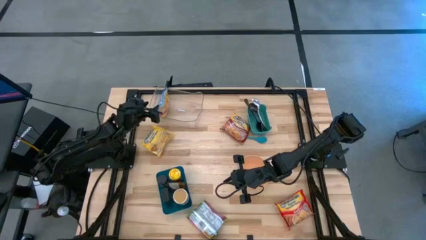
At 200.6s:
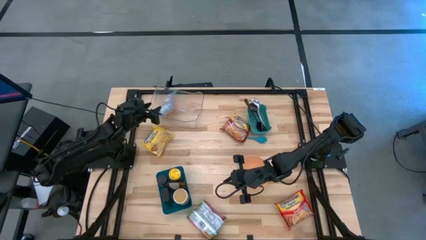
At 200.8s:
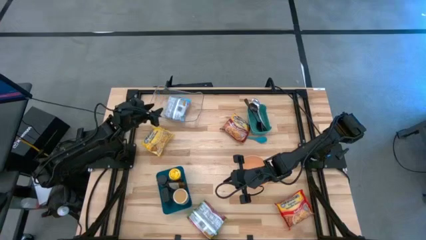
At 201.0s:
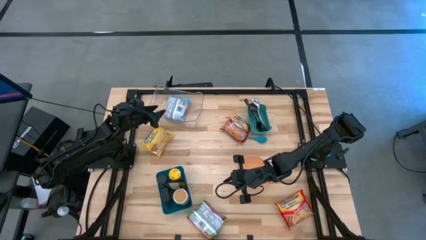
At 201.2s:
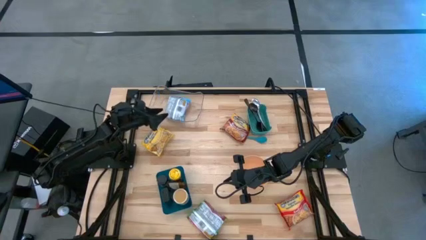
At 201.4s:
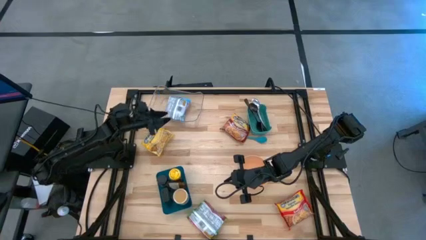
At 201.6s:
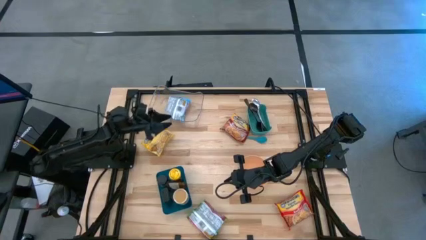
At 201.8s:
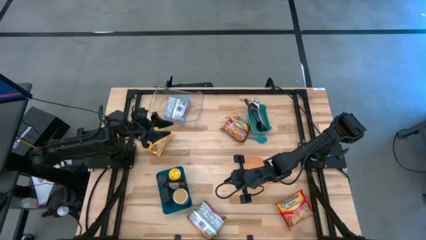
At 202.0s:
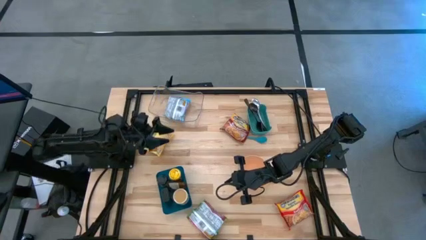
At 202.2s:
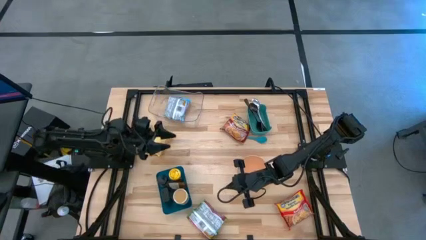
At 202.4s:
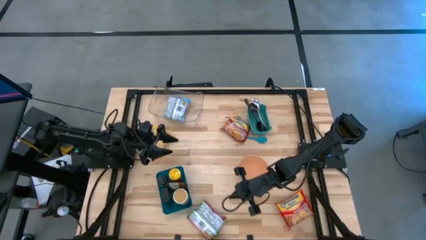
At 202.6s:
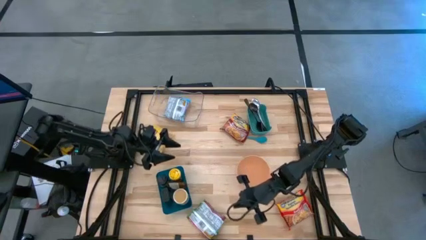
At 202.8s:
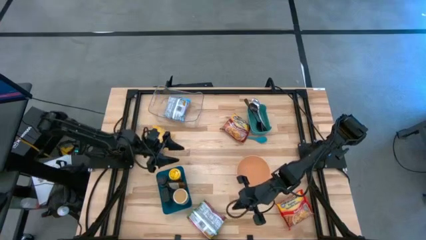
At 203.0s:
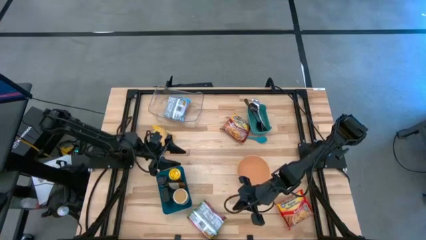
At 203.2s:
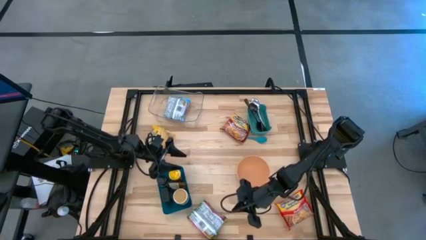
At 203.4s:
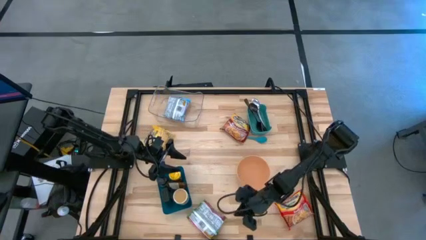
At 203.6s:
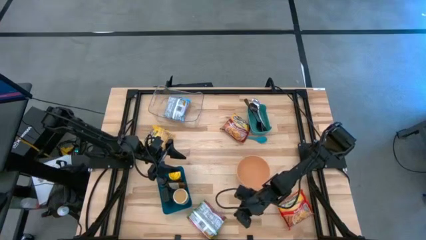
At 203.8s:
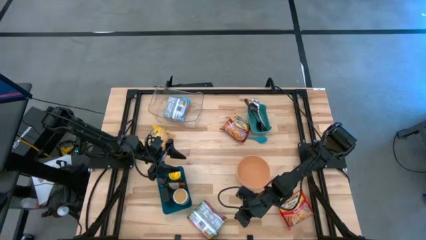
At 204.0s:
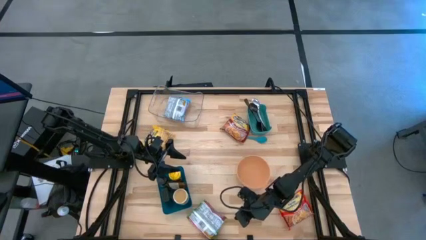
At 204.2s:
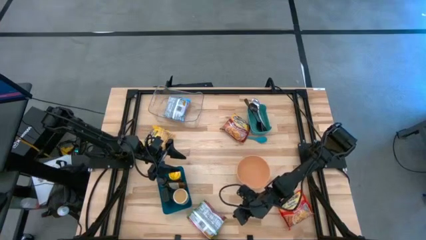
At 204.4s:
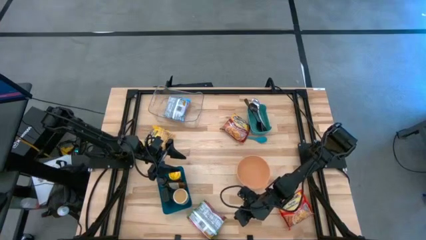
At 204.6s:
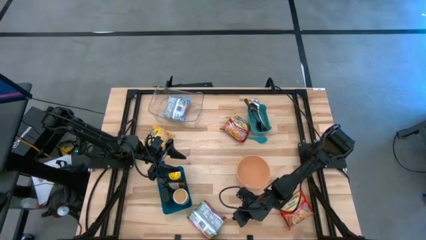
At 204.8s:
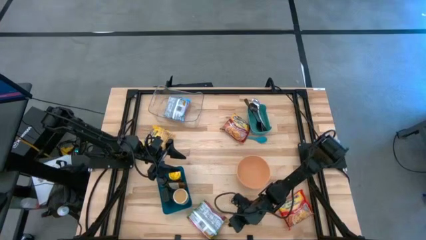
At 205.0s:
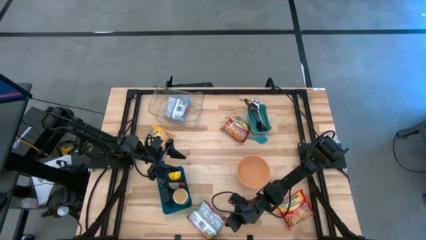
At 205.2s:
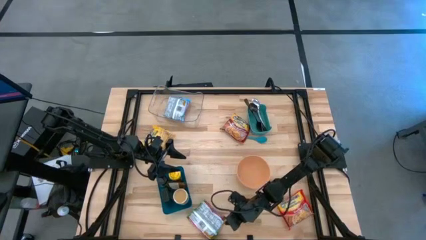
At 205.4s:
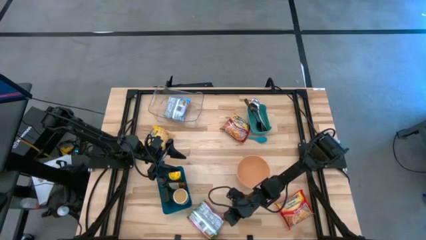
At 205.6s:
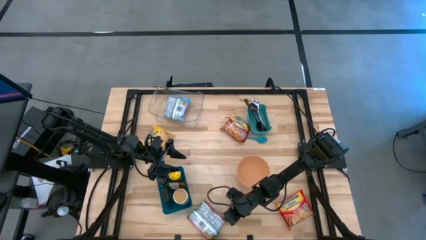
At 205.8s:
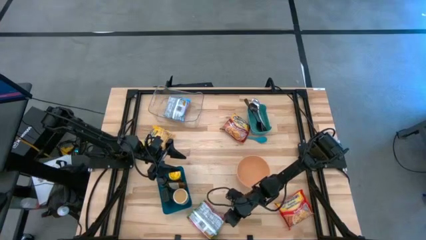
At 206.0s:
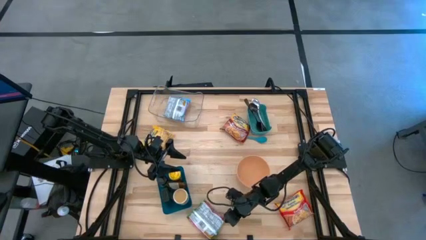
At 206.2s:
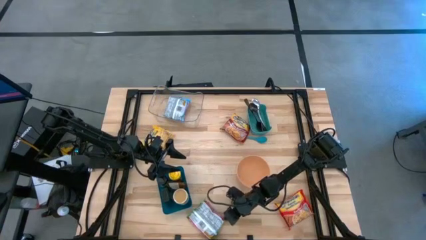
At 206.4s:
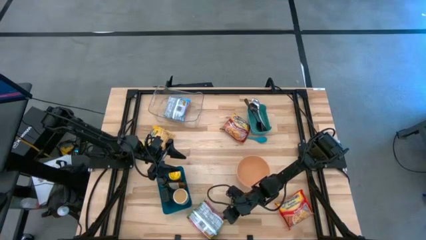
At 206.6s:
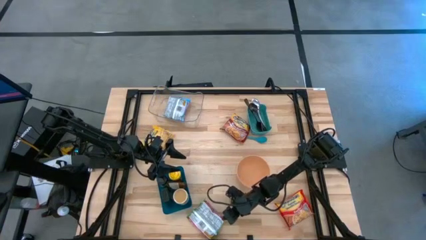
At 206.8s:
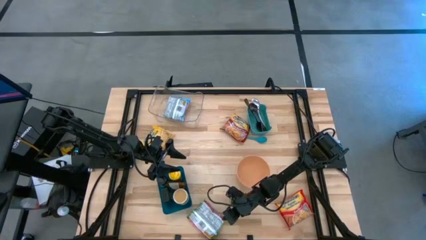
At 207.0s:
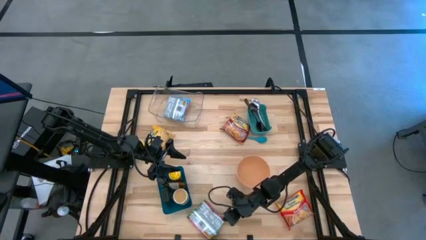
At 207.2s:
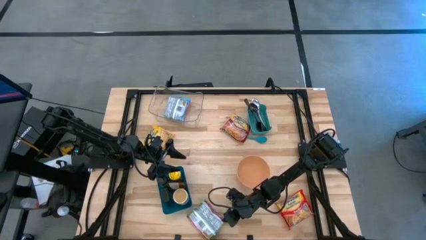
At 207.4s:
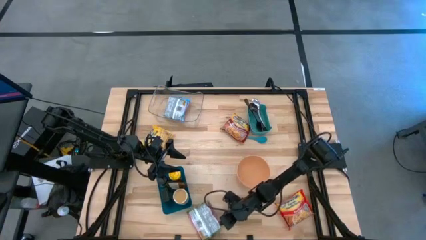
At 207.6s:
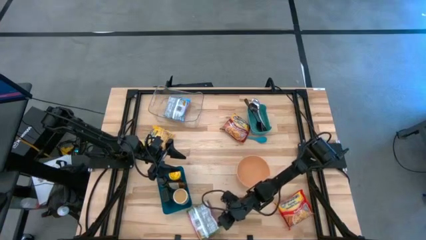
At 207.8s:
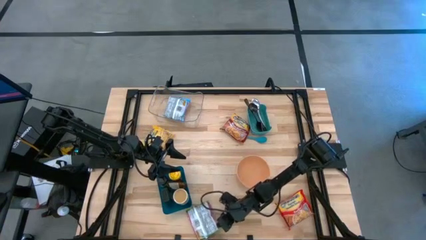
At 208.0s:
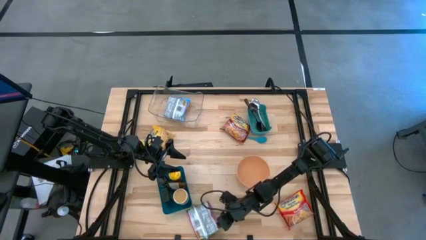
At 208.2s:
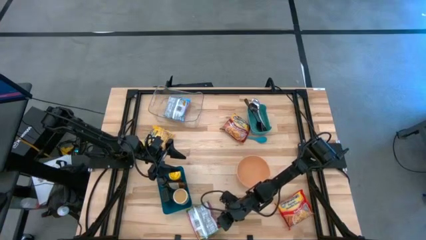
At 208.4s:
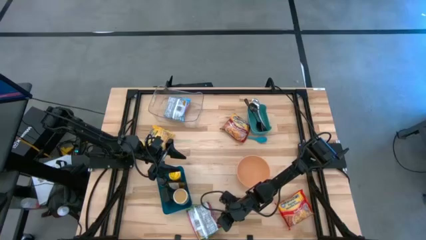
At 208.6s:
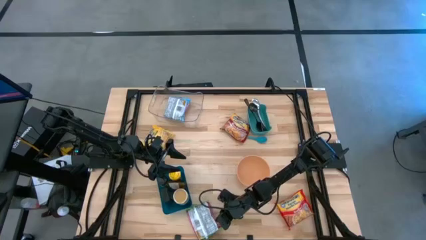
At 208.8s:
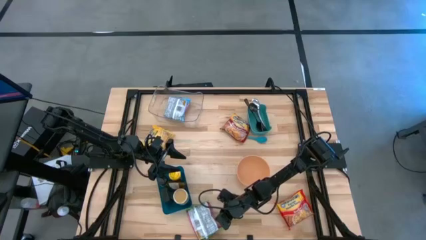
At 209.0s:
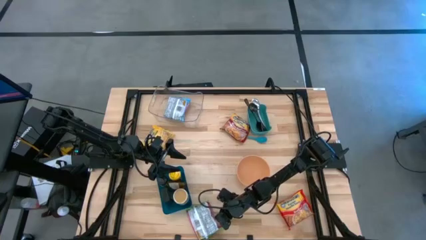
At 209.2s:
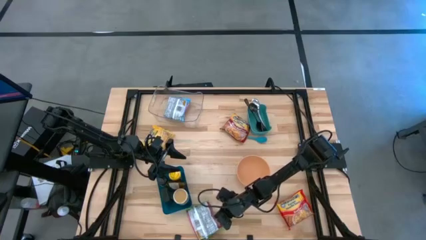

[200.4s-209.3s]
Task: Pick & Place Food Item
Put the green noodle pack into the transparent bin

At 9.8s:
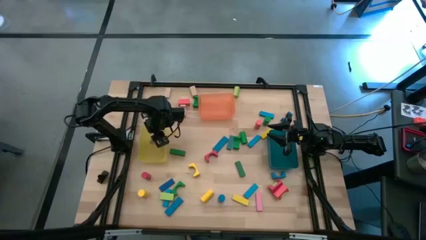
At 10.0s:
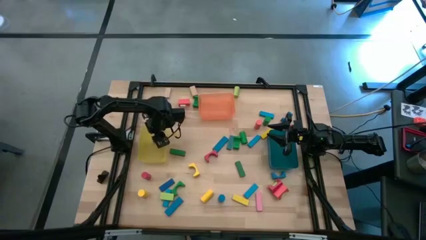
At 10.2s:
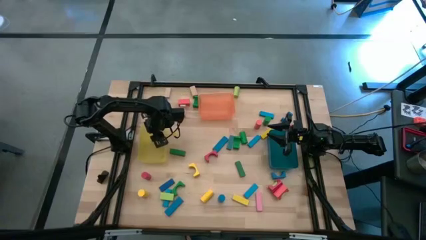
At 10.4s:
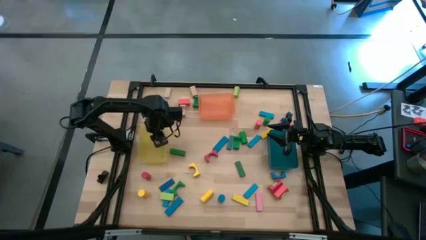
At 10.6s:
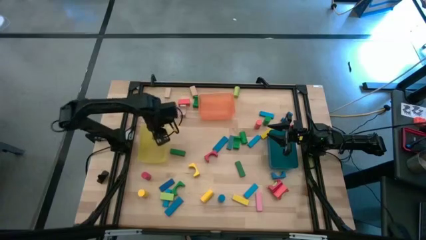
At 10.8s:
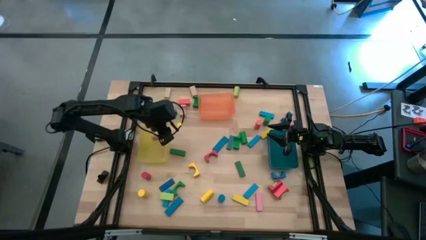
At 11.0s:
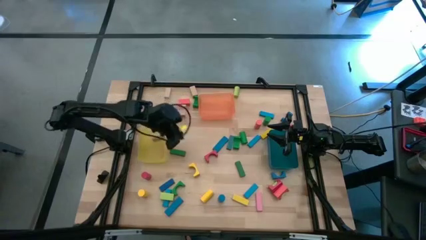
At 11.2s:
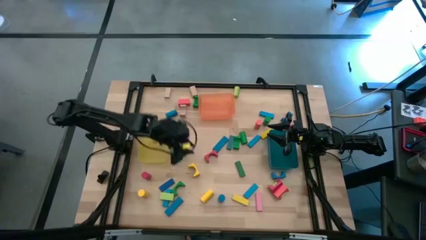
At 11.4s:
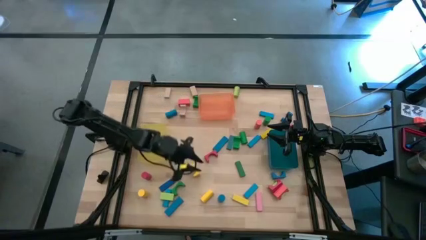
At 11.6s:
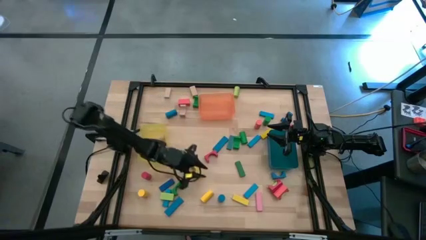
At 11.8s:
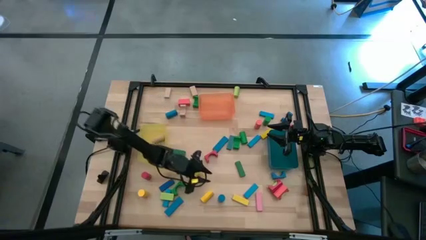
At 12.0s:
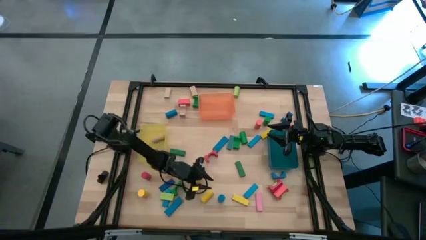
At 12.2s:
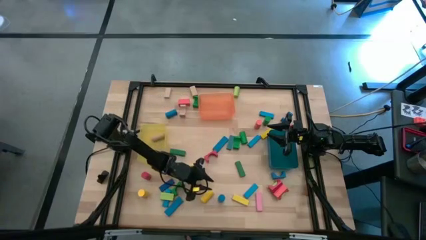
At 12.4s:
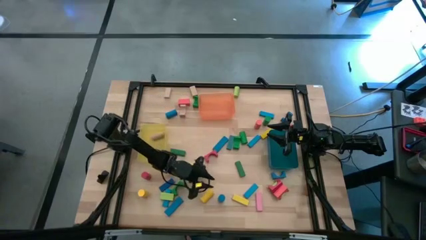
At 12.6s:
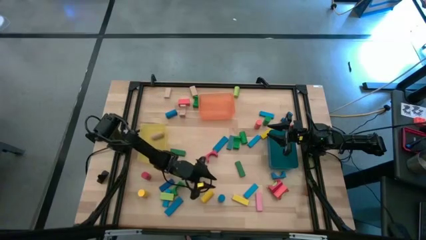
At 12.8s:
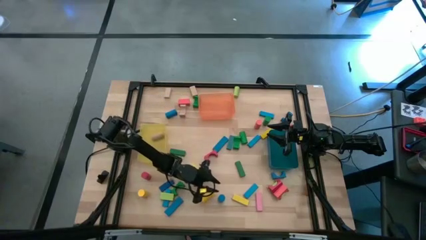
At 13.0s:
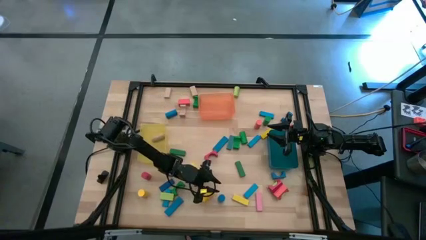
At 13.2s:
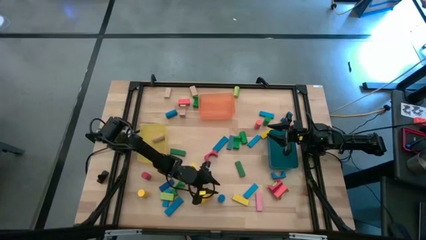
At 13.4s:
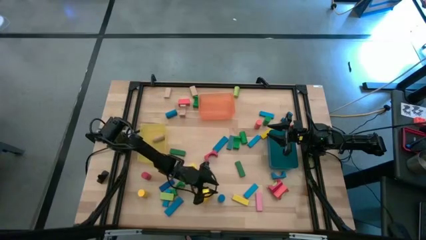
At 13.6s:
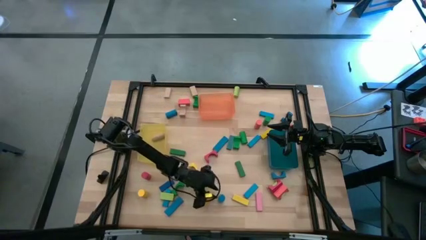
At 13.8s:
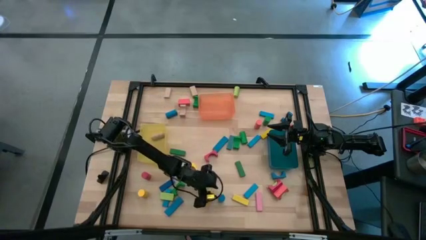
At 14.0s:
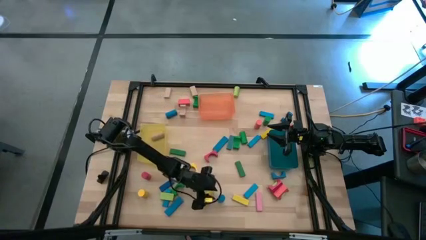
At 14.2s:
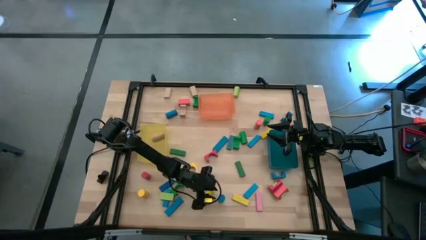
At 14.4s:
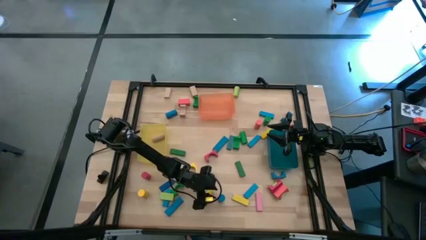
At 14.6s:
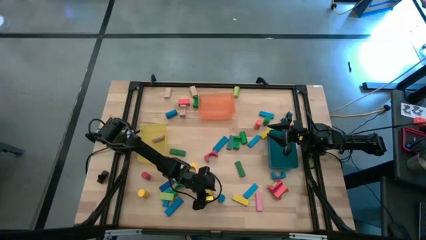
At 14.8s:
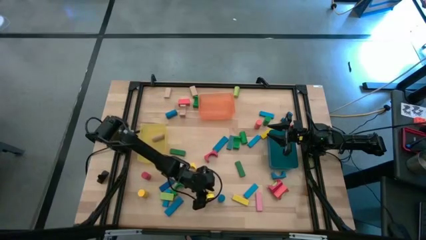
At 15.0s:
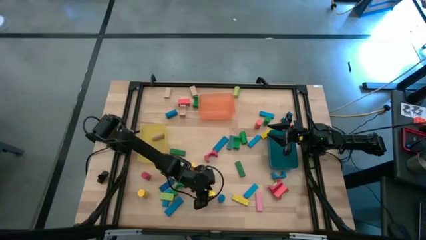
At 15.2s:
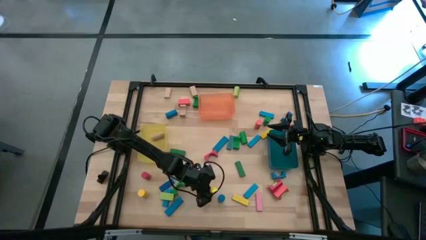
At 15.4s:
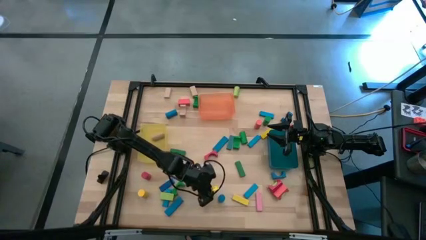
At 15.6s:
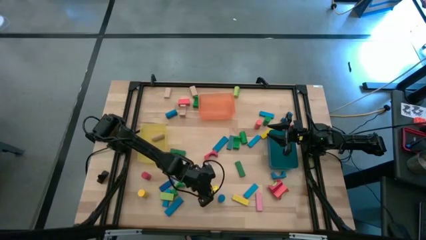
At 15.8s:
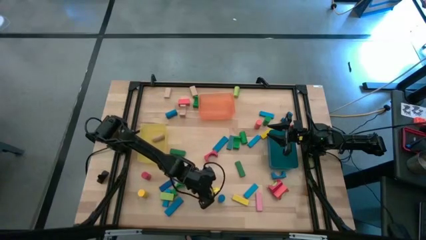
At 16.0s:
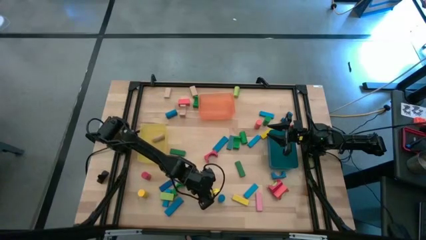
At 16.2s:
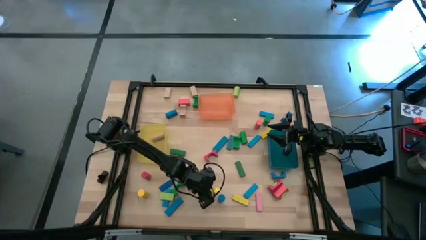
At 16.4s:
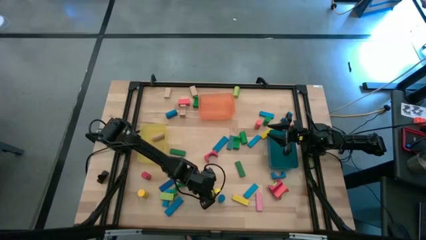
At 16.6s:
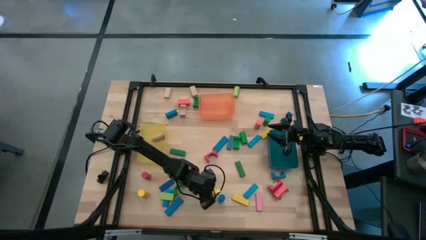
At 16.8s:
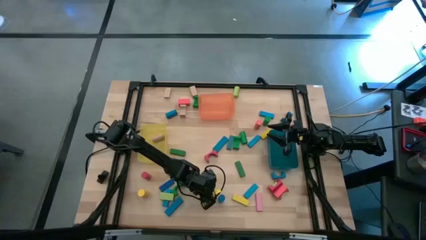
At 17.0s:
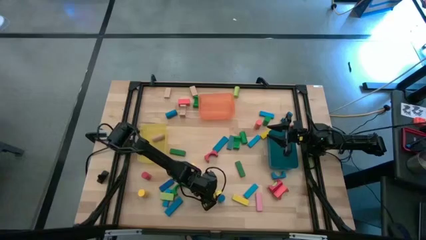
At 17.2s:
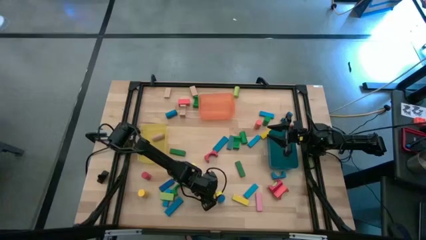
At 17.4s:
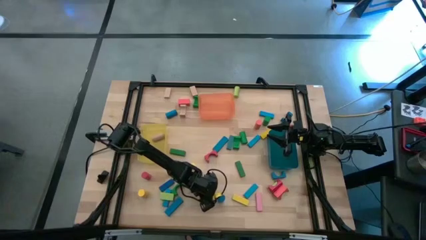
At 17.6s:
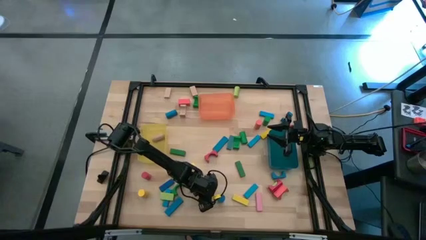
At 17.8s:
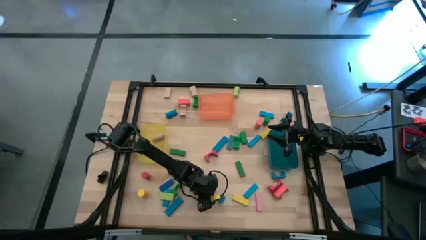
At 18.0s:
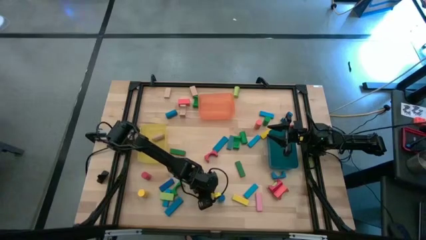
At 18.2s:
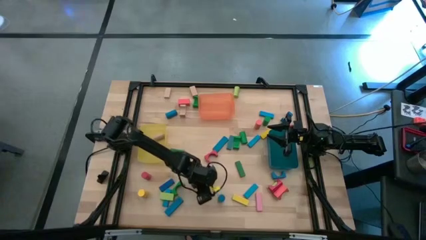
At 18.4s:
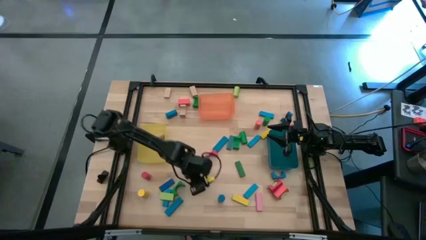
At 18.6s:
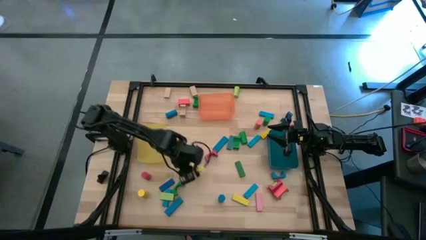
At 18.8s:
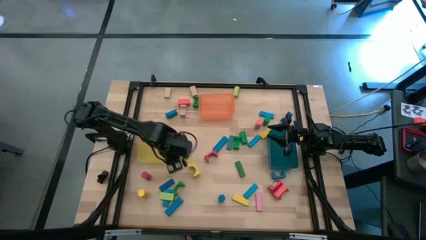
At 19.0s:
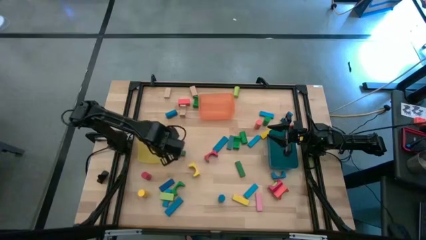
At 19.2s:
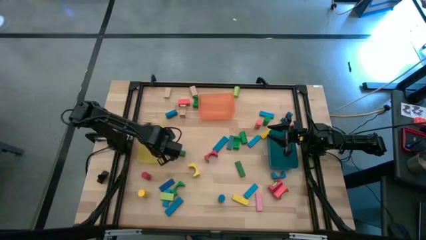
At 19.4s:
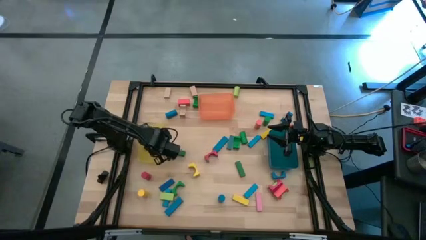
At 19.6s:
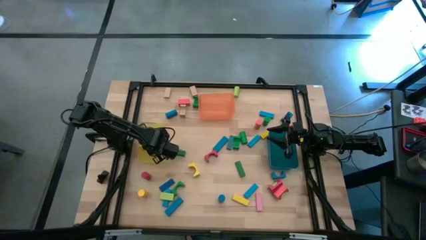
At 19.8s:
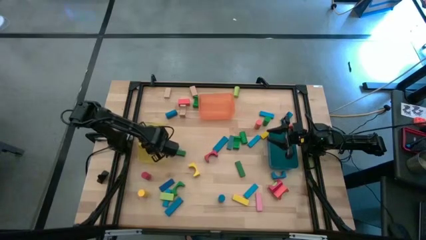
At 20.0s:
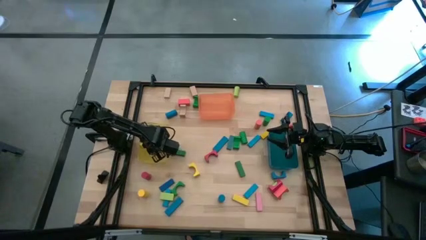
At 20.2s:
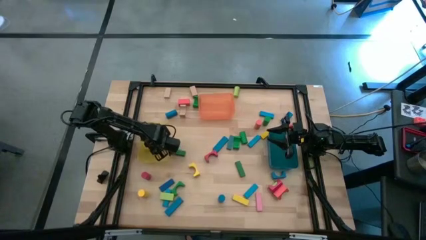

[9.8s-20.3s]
Task: Sort blocks by size
Put the yellow cylindrical block into the yellow bin
